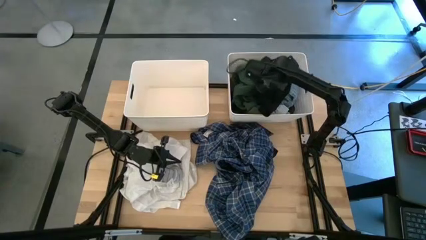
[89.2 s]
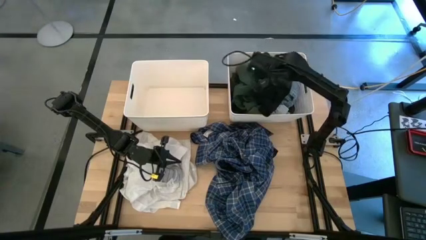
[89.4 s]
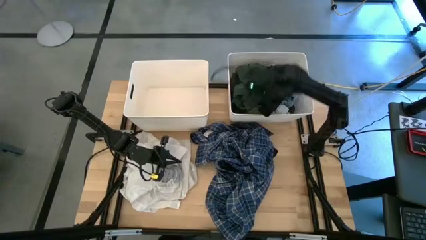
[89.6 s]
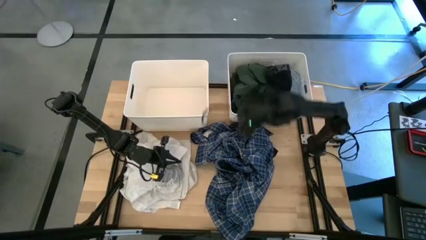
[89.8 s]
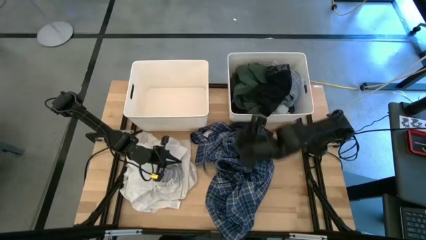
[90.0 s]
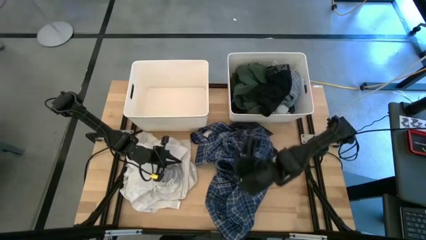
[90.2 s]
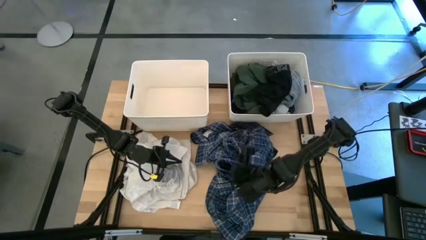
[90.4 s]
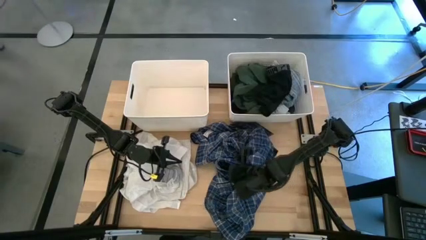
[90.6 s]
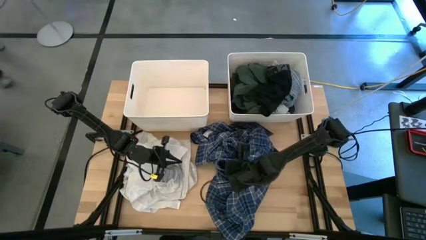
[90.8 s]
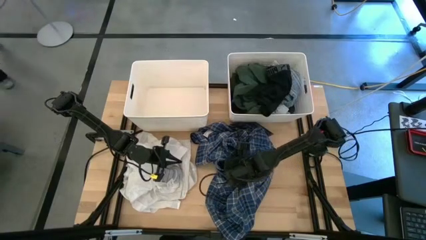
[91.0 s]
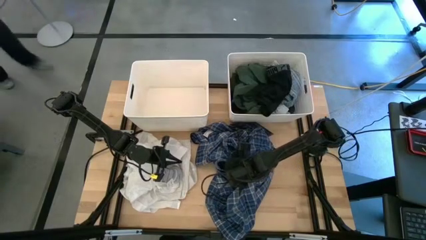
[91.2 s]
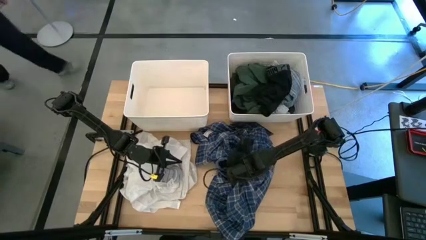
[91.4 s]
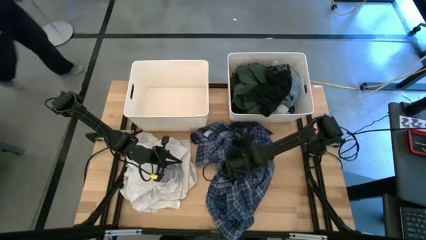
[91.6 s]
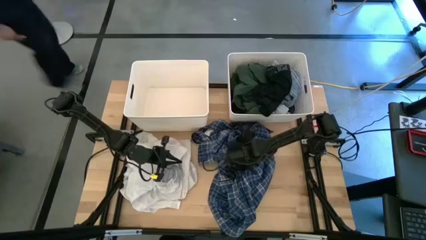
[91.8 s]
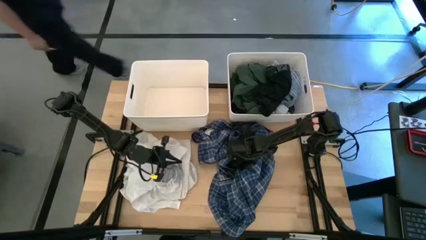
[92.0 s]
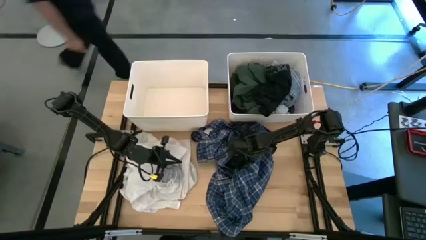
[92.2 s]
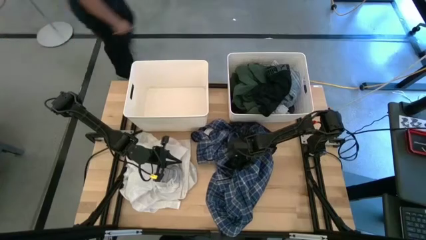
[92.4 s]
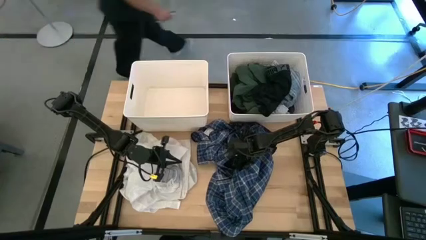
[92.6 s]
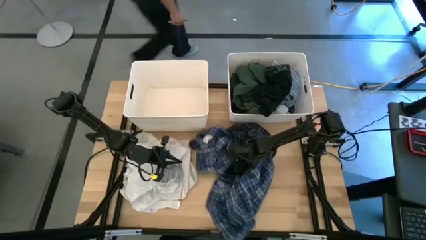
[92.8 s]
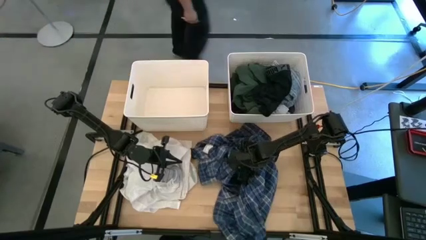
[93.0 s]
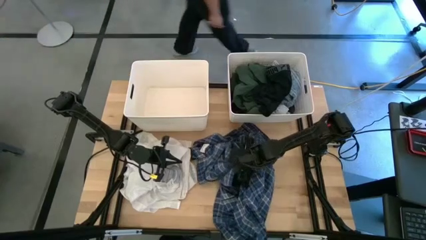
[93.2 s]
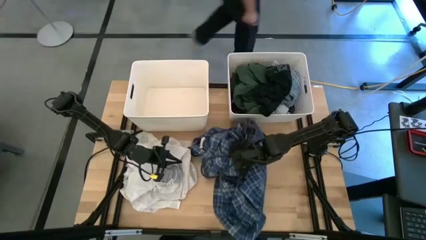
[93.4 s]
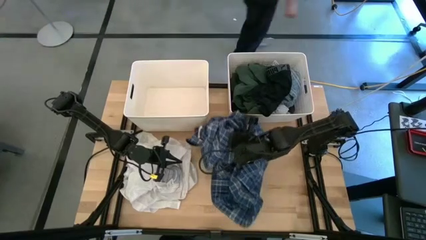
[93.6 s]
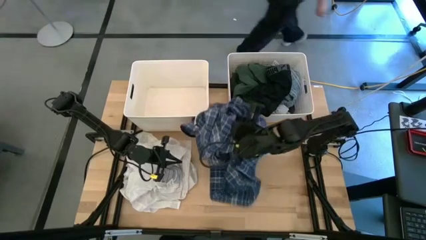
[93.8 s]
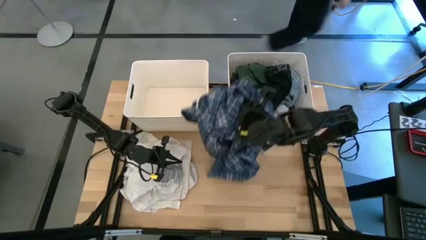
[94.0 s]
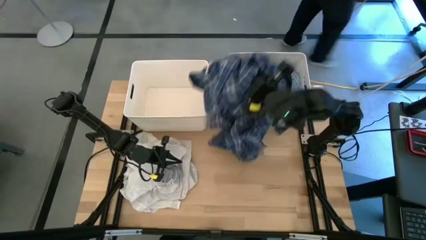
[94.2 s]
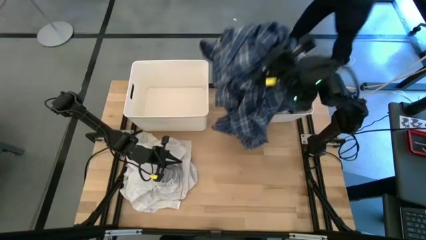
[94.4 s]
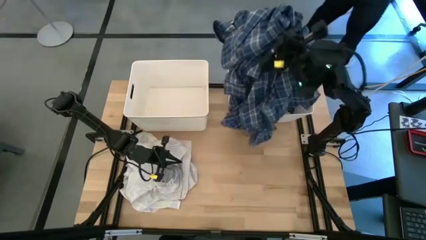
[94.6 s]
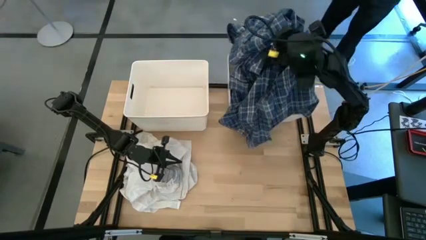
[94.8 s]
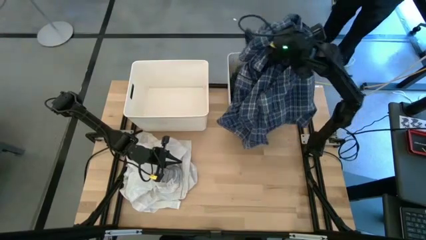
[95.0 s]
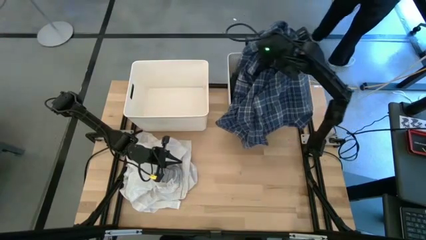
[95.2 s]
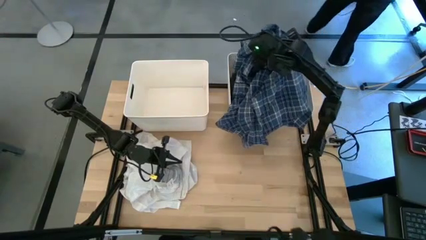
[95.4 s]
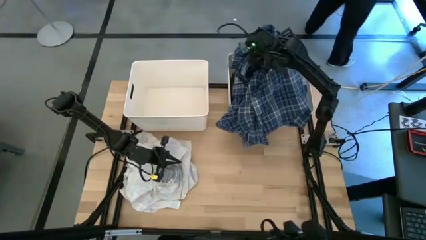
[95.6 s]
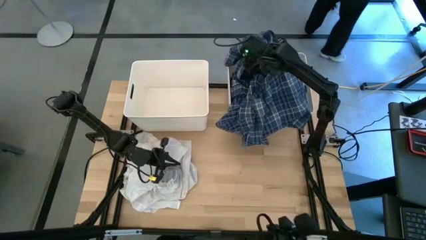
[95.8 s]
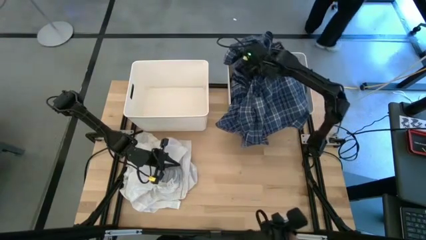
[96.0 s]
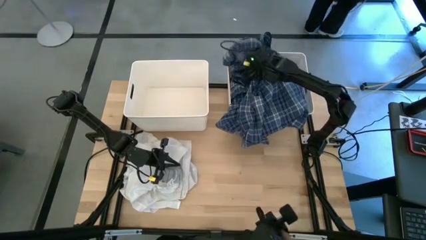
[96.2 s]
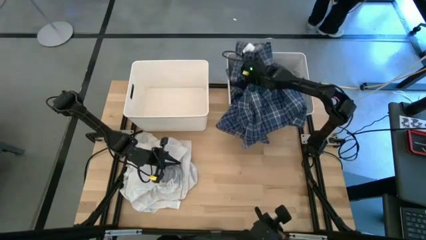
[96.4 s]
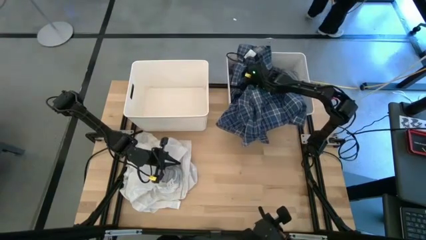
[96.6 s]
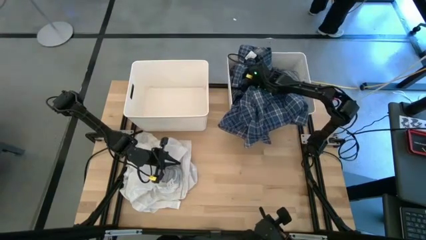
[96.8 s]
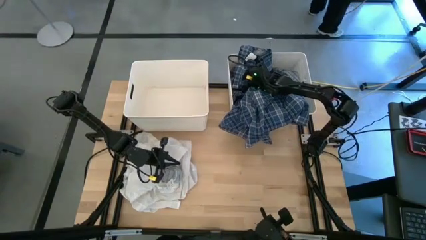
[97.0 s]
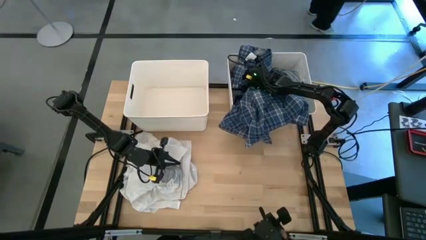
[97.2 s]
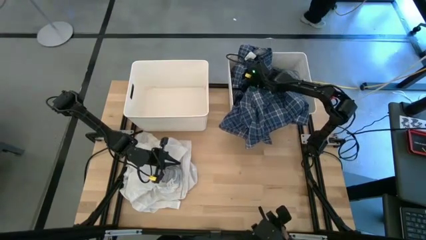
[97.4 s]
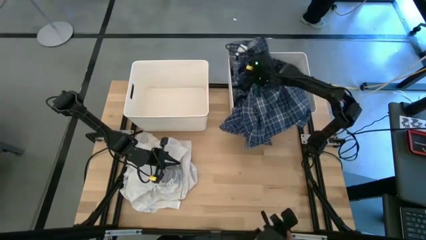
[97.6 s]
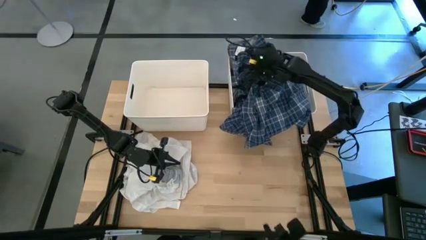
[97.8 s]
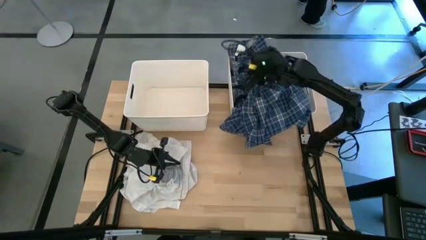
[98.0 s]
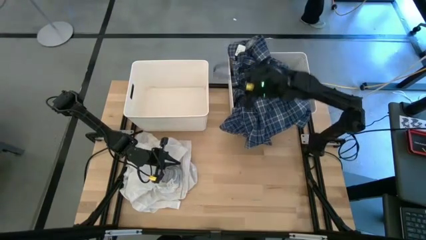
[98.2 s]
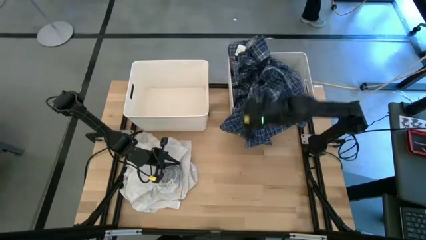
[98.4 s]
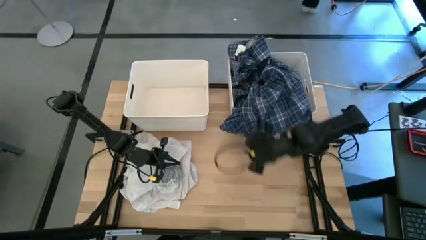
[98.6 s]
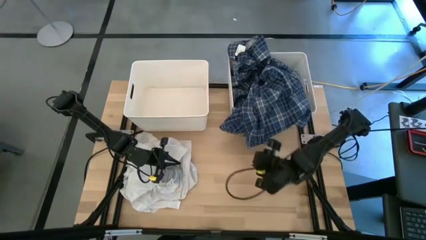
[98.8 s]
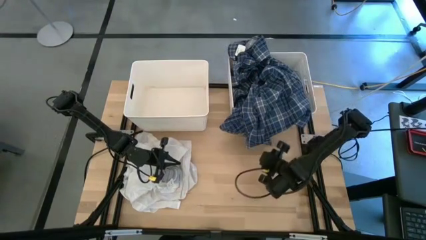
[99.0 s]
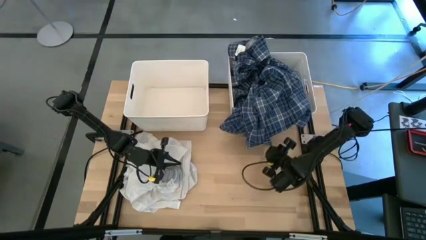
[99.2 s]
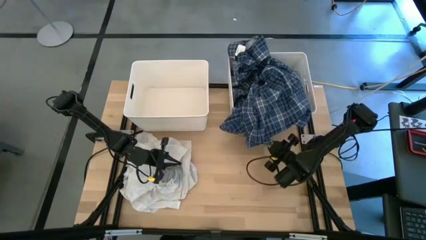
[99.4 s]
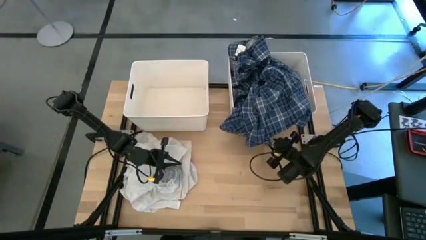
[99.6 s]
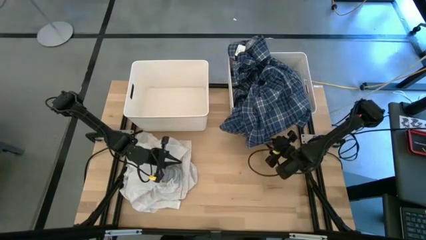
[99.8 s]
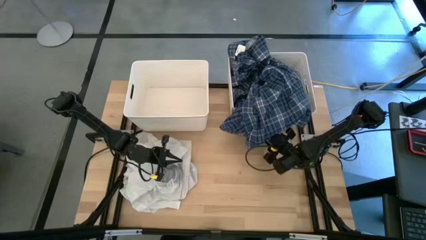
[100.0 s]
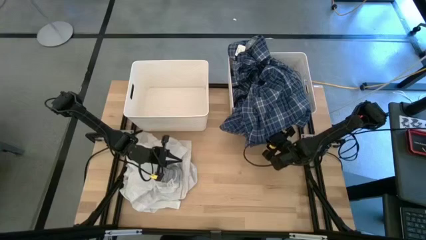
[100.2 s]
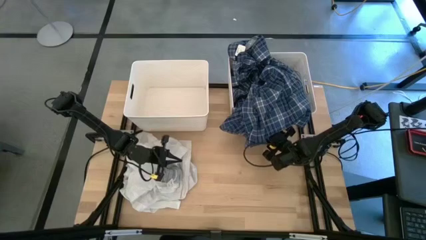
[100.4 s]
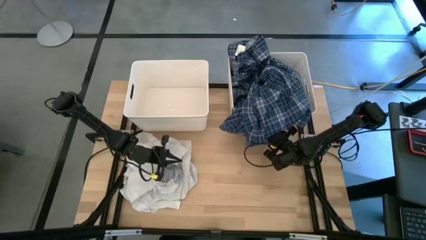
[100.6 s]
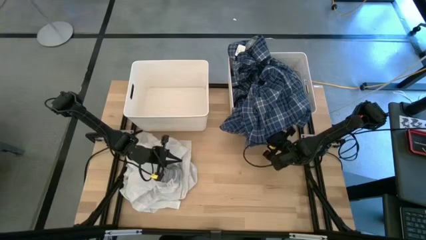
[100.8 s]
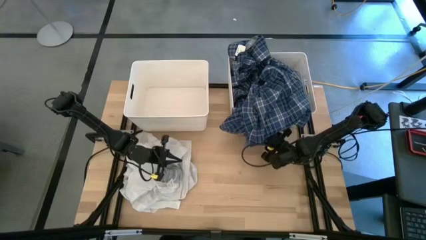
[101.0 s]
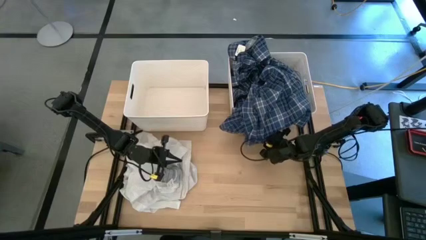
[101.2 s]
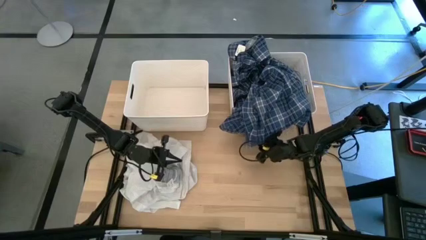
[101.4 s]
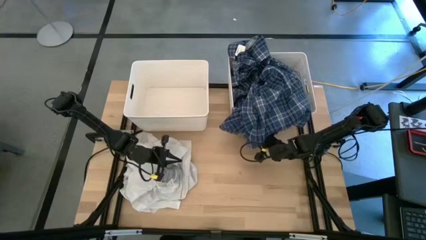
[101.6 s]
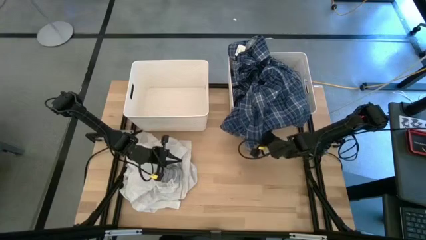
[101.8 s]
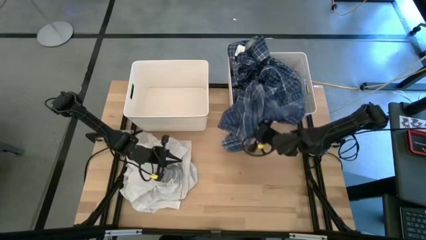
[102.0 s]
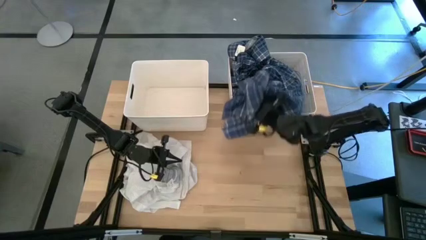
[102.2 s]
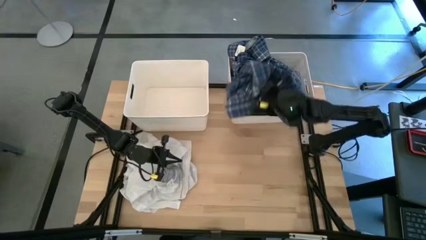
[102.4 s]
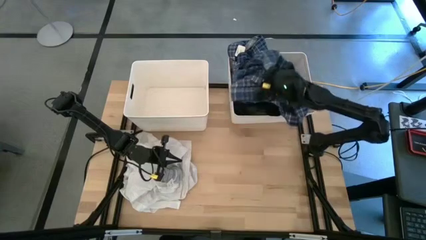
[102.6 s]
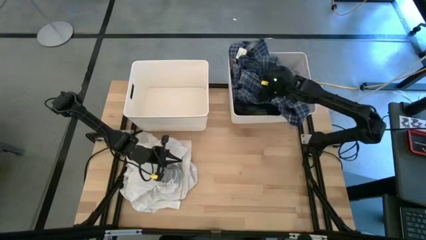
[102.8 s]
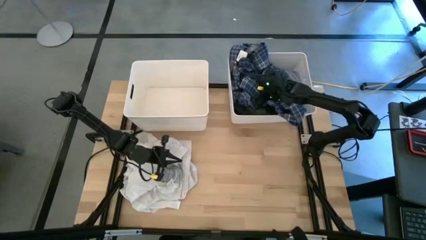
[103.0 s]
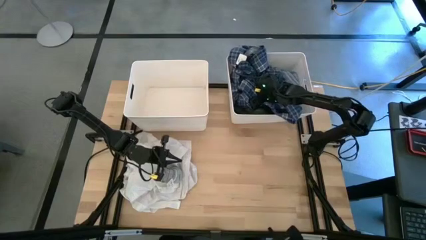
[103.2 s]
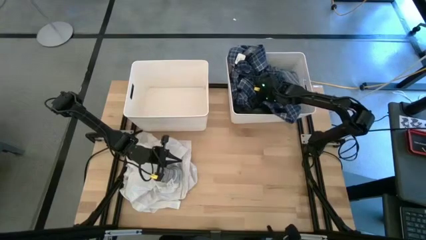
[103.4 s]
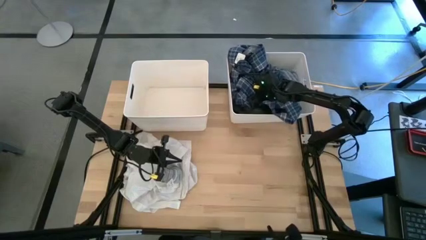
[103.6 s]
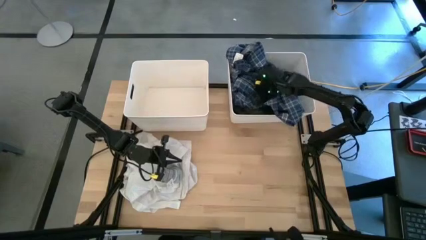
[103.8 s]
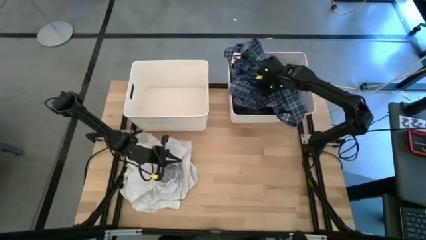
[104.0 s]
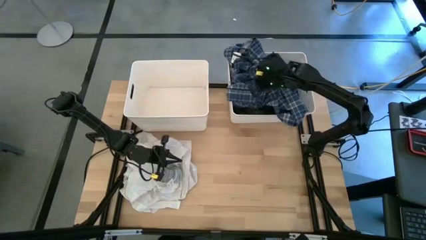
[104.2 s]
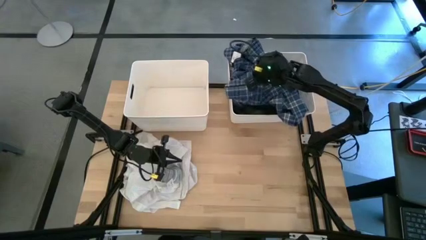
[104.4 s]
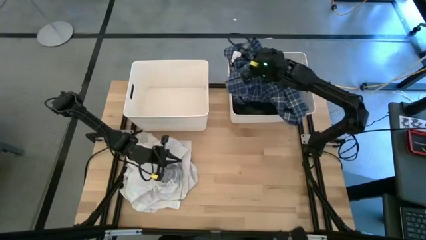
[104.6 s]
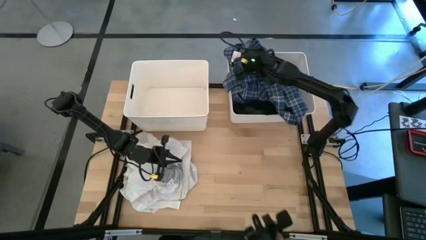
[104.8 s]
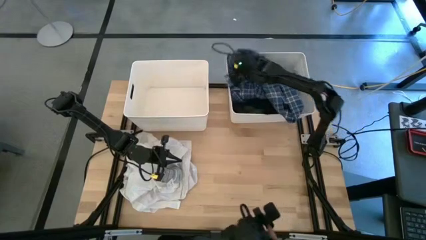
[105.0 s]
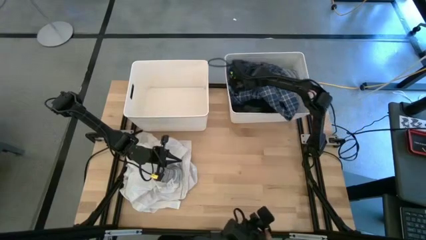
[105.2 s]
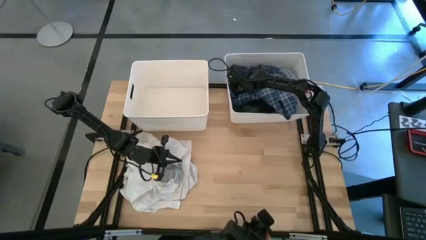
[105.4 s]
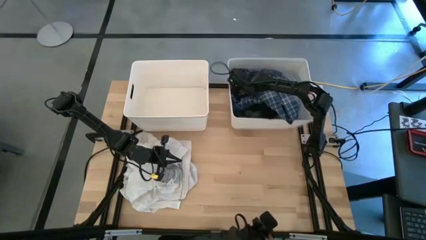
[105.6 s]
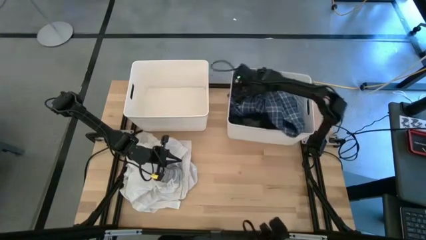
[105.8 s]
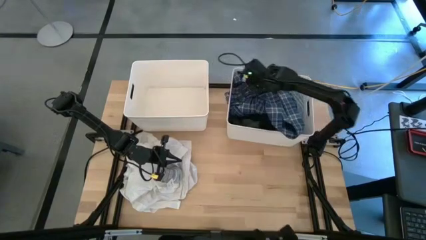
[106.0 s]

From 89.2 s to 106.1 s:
Task: Sort clothes
Put the dark blue patterned shirt into the right white bin
